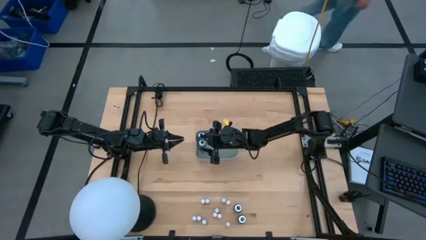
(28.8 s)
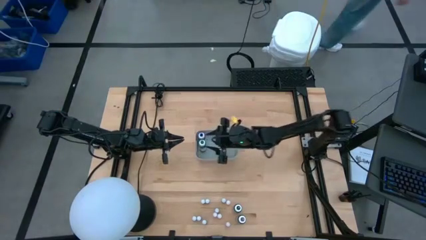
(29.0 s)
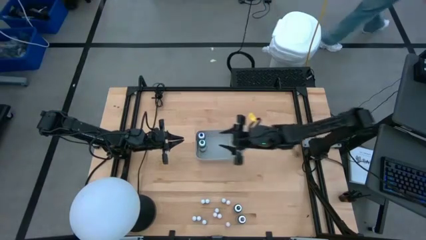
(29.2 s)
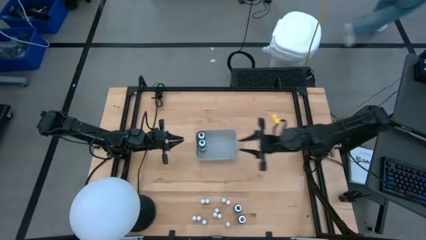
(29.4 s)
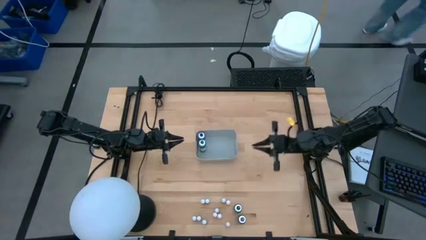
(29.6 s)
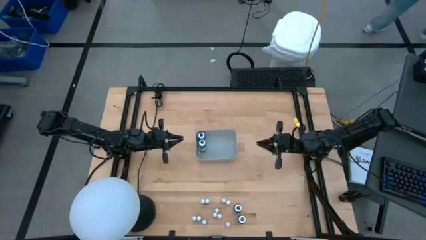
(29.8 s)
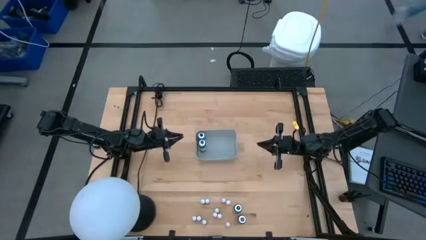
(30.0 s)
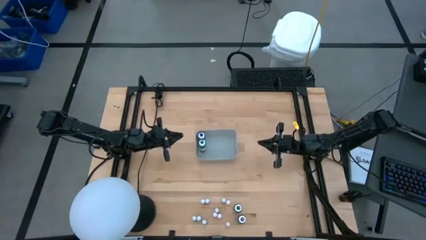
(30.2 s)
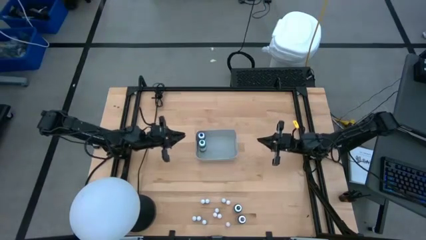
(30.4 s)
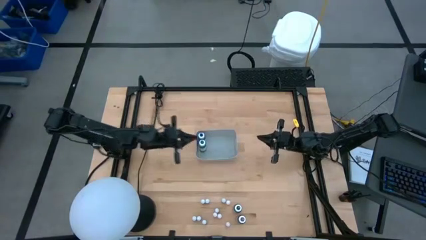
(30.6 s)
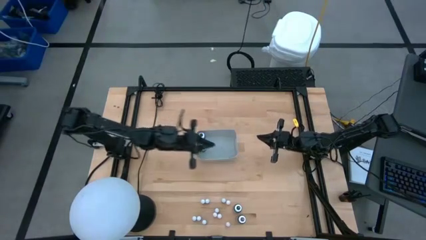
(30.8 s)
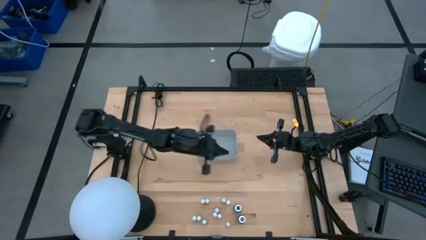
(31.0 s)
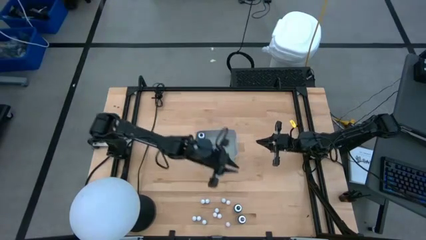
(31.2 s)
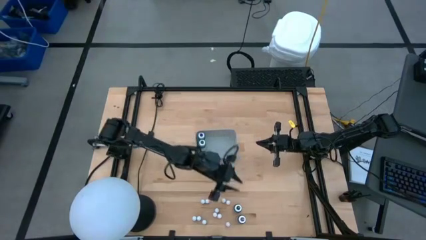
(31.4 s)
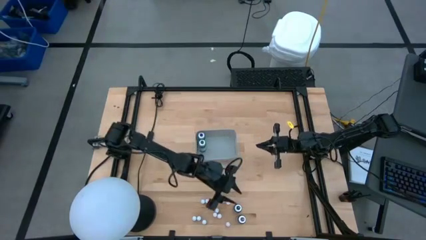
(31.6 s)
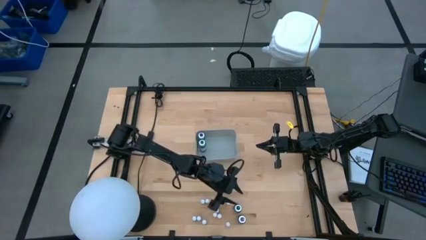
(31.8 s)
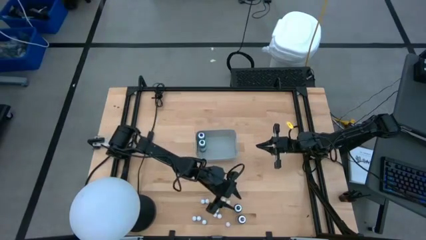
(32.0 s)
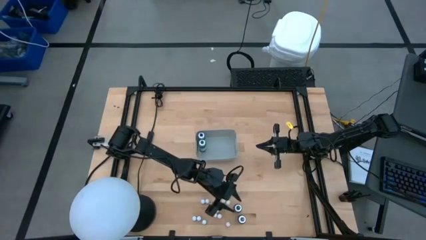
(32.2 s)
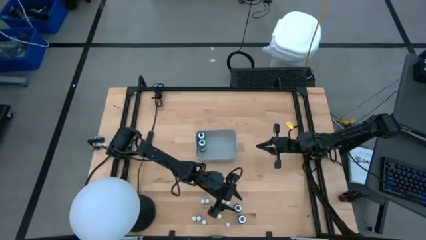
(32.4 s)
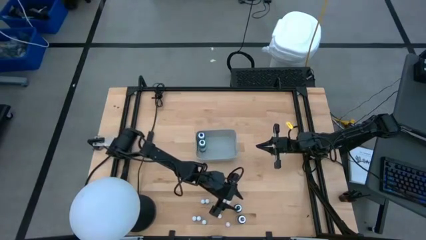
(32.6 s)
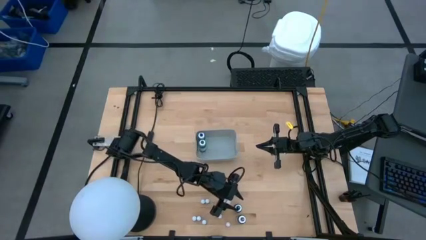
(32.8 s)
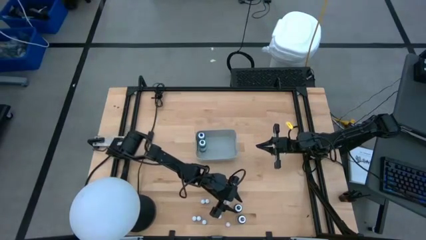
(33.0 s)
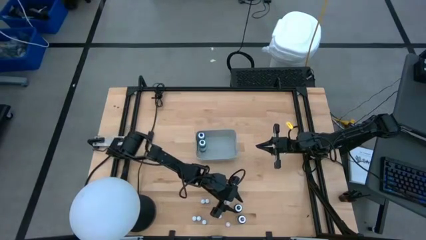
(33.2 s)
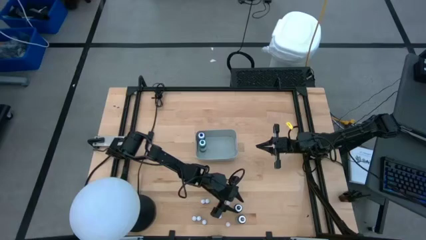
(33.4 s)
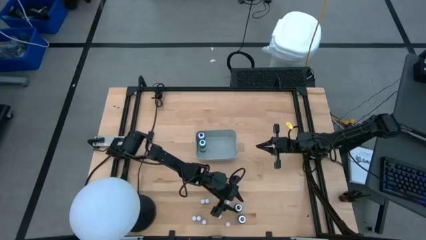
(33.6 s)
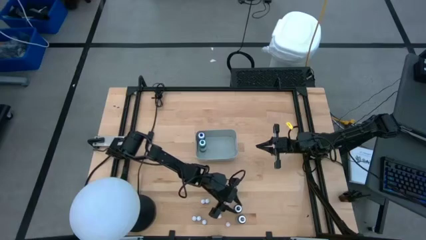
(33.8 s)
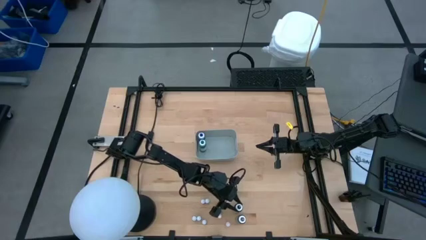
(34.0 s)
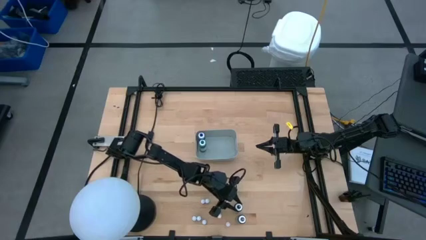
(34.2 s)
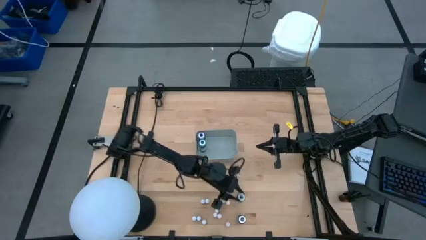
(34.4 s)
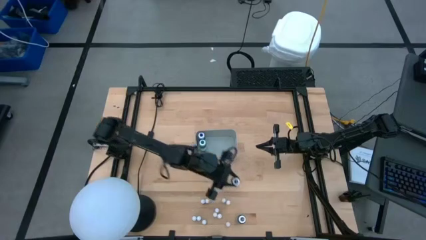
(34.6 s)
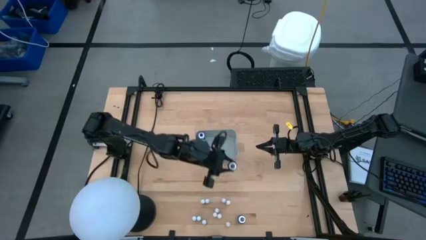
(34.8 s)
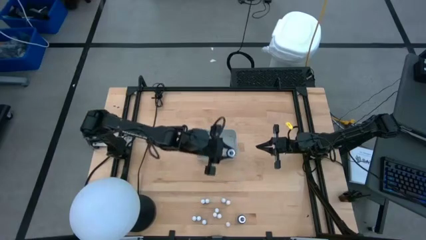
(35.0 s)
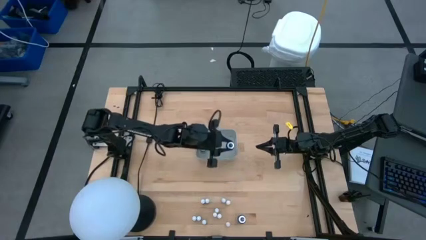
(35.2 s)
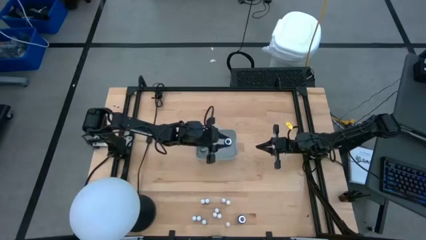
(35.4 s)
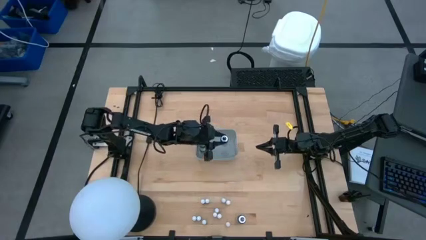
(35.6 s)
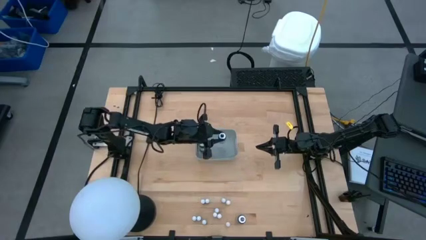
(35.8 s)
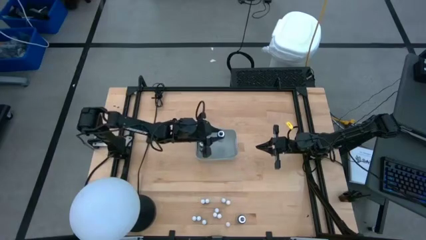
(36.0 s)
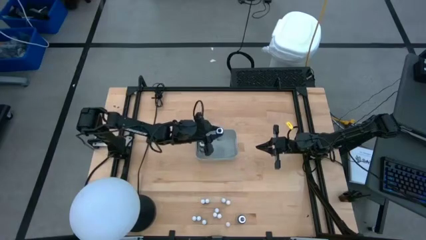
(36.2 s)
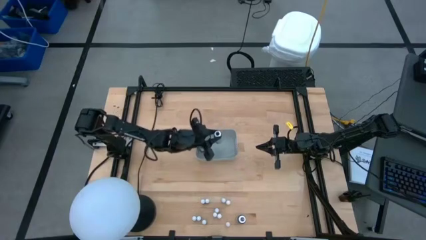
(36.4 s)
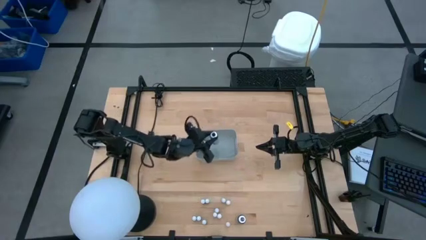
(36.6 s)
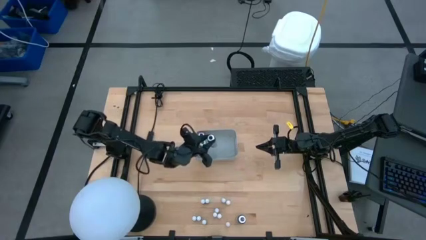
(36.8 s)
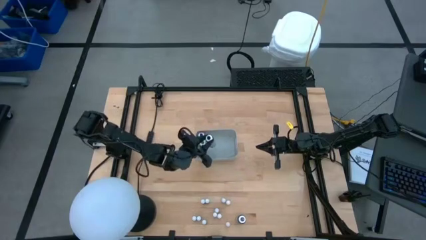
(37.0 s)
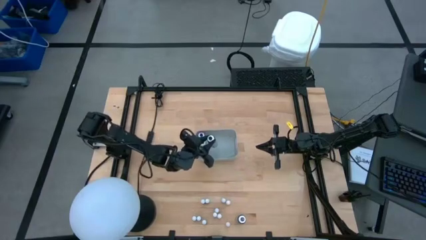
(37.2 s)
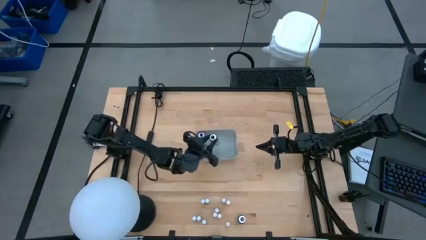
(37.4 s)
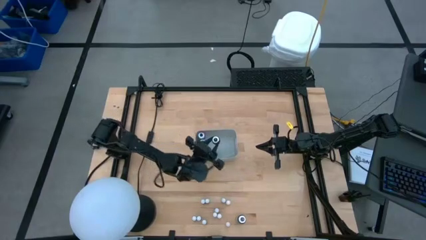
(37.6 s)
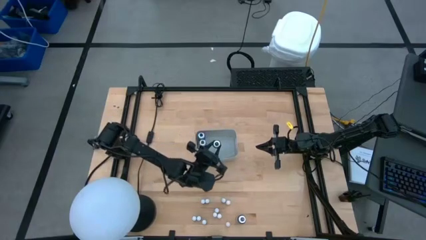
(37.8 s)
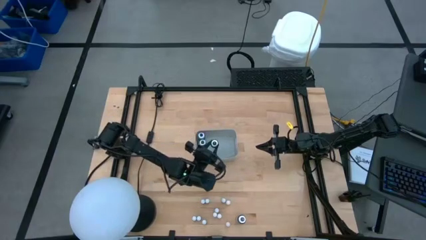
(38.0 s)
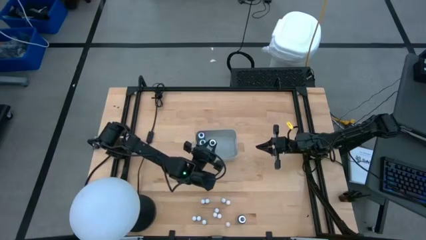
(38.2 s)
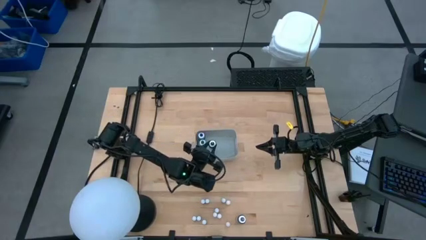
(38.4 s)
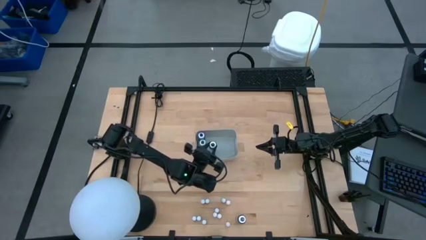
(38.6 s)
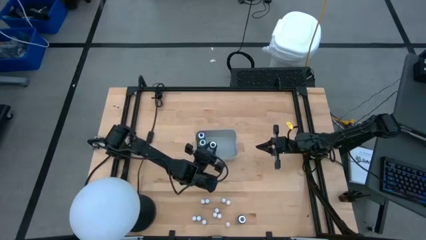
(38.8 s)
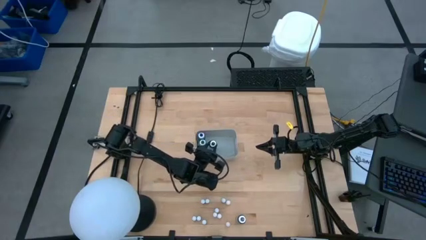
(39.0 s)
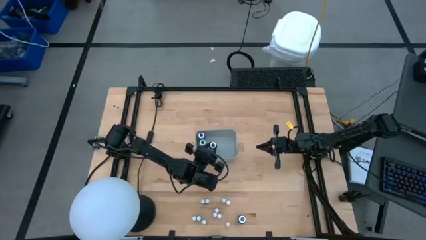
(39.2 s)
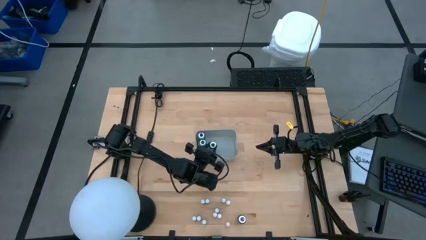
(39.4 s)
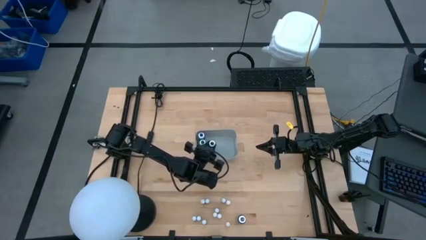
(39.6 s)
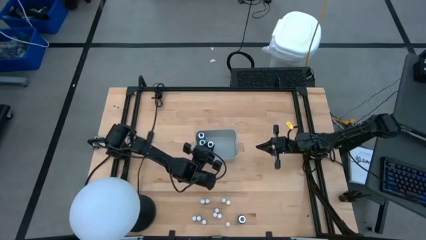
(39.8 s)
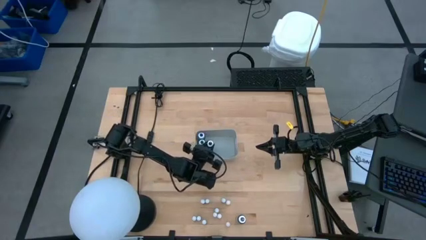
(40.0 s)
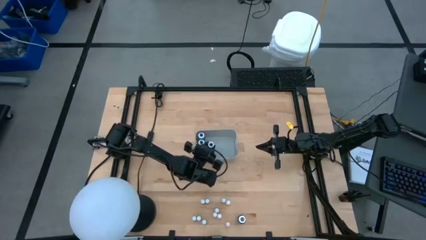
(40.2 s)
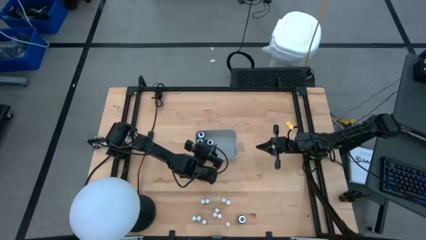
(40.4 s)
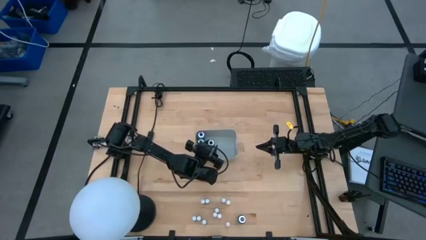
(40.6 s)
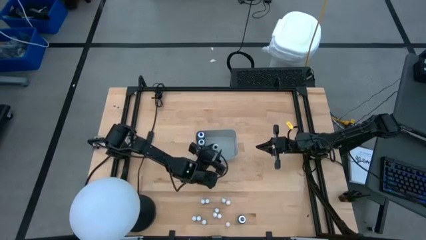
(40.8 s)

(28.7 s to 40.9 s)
Task: Pick & Place food coloring
Put the large black food coloring bottle into the gray bin

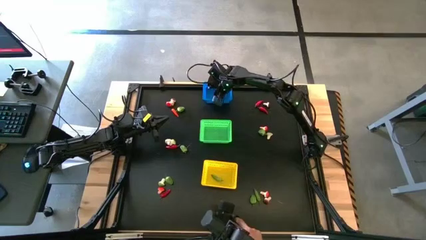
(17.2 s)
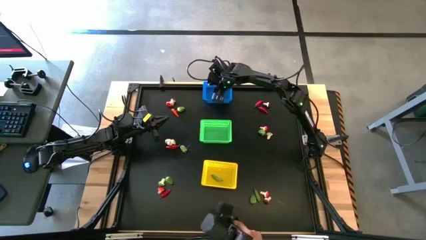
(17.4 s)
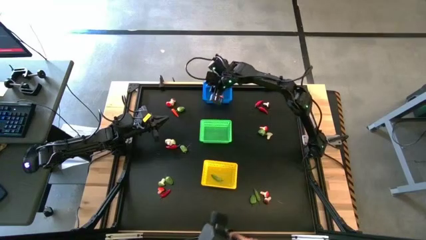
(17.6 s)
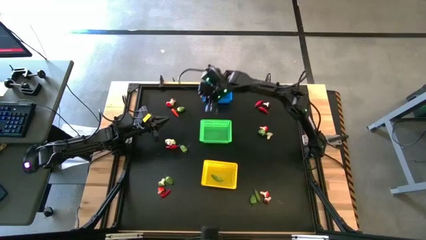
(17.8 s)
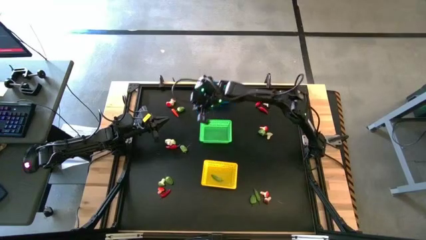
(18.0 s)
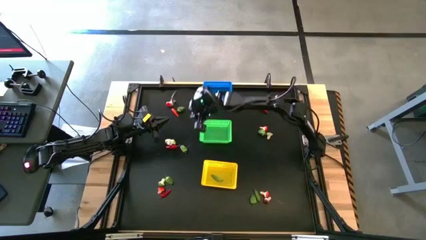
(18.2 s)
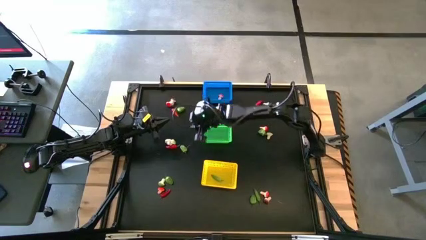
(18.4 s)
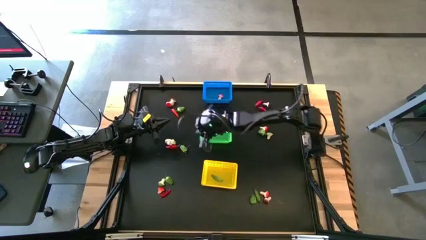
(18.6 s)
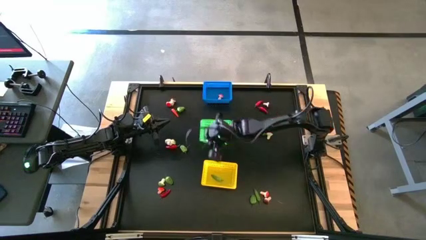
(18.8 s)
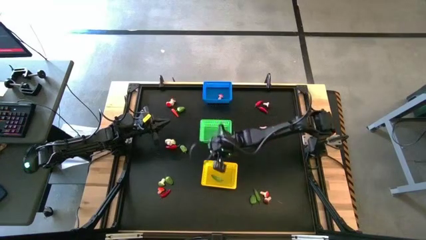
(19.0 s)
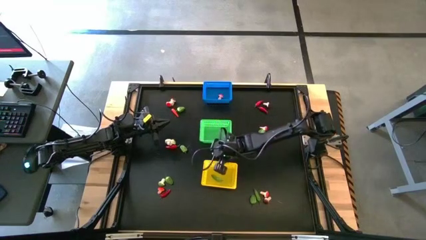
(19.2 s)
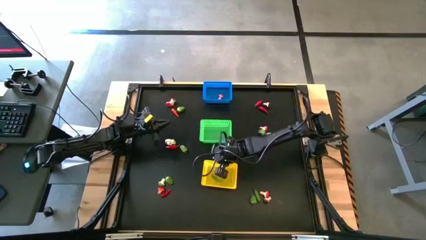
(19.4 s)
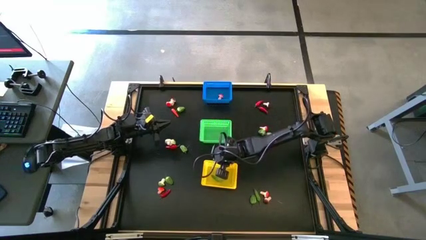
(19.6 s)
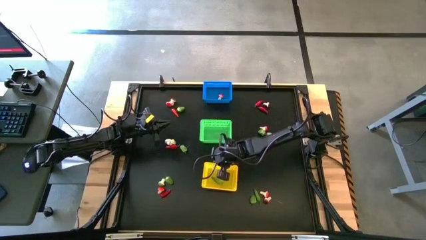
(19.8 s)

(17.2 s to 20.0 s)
Task: Sort produce into baskets
Adjust the yellow bin

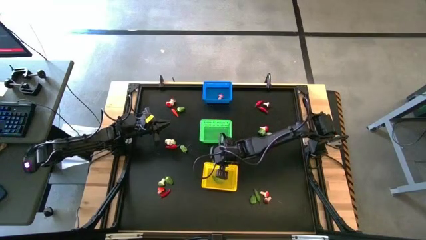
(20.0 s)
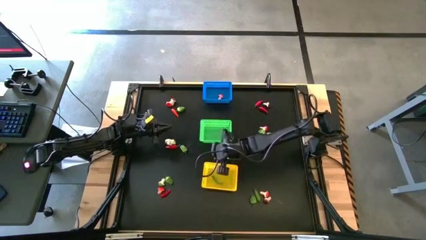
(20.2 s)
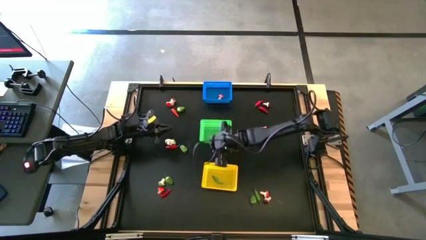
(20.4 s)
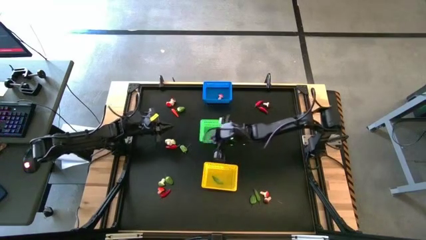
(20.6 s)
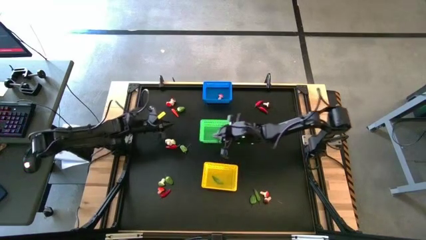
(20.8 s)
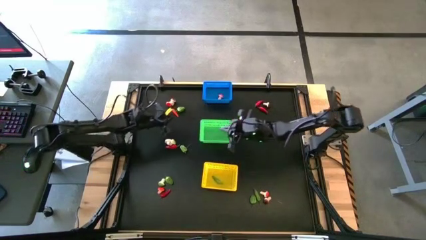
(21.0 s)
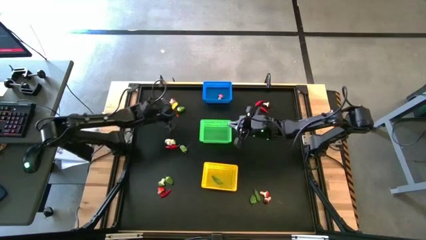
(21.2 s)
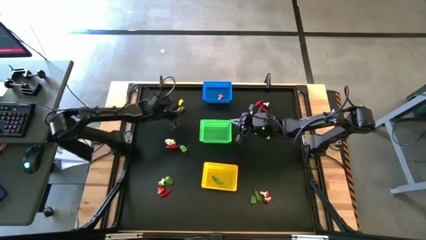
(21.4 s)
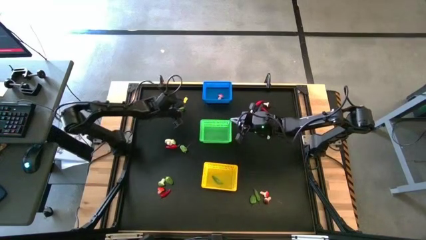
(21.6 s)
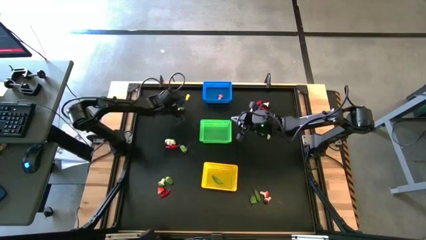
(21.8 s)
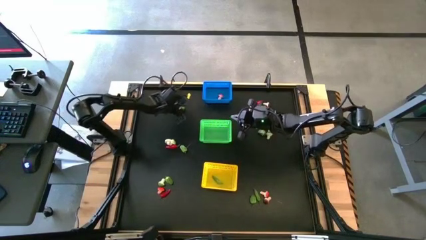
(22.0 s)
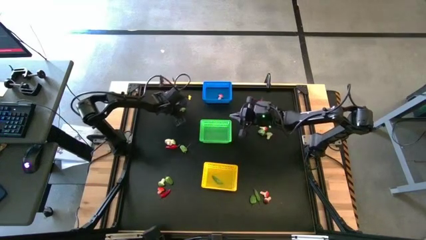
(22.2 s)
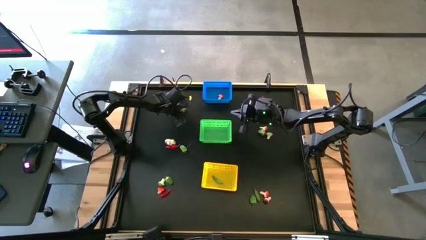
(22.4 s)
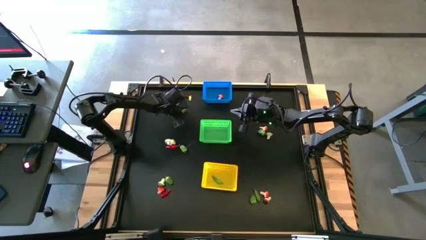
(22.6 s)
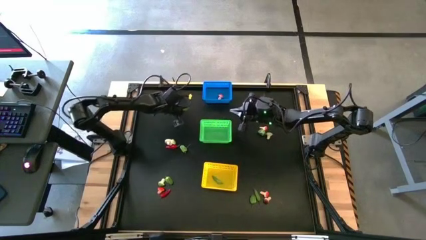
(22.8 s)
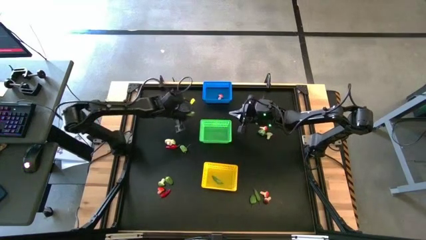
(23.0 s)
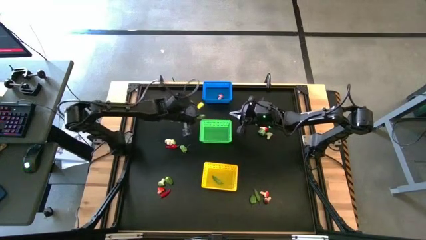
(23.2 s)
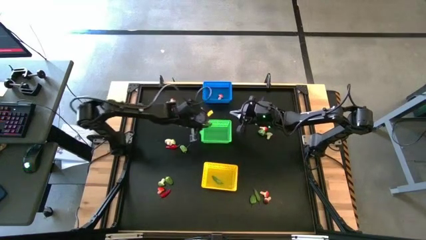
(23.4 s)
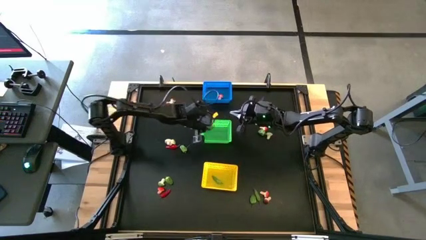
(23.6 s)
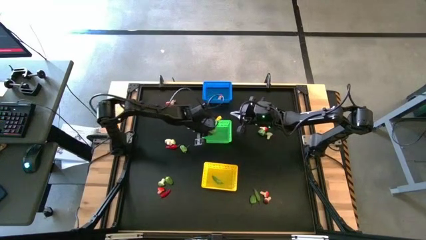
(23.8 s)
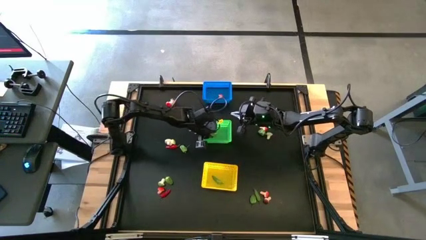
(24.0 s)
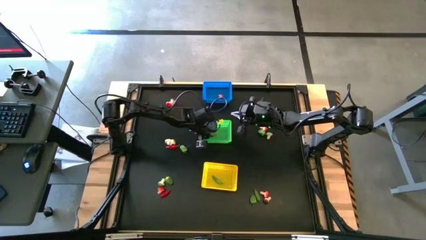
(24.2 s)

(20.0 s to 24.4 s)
Put the green chili pepper into the green bin
